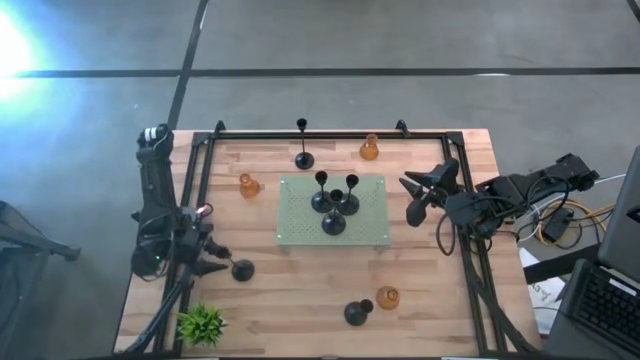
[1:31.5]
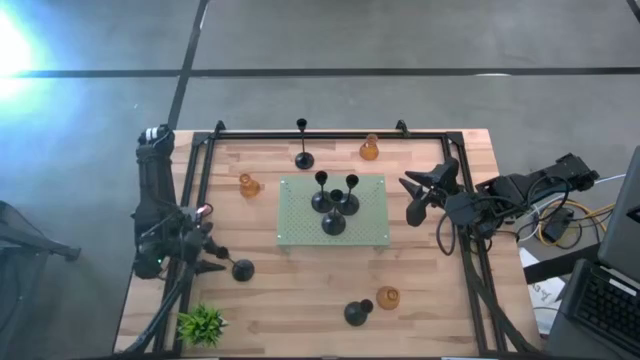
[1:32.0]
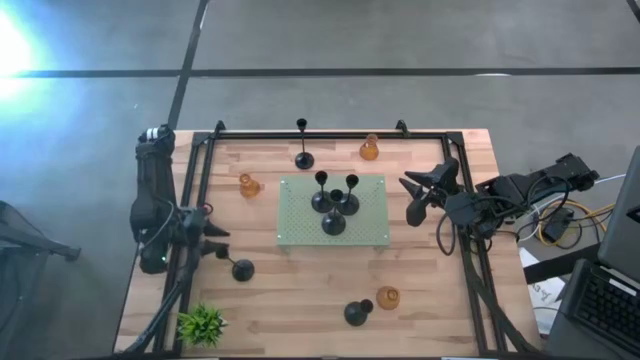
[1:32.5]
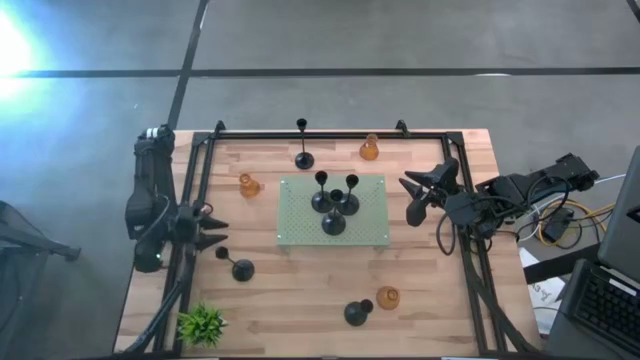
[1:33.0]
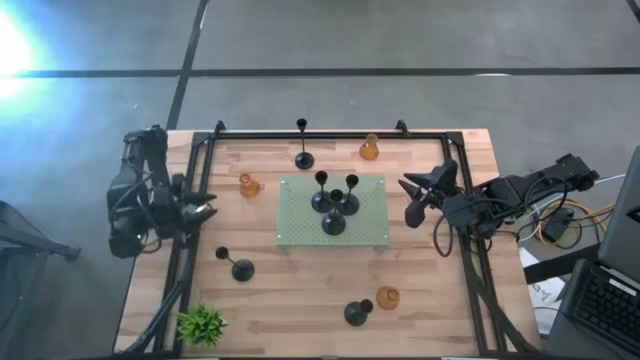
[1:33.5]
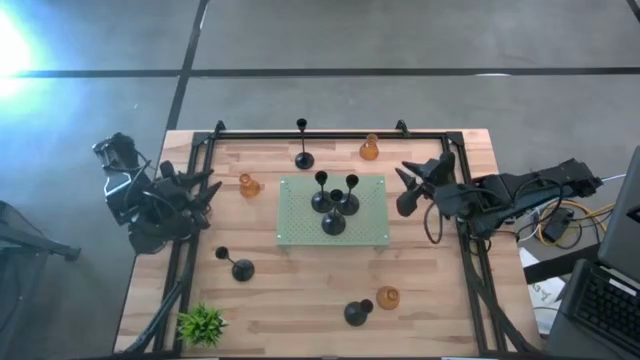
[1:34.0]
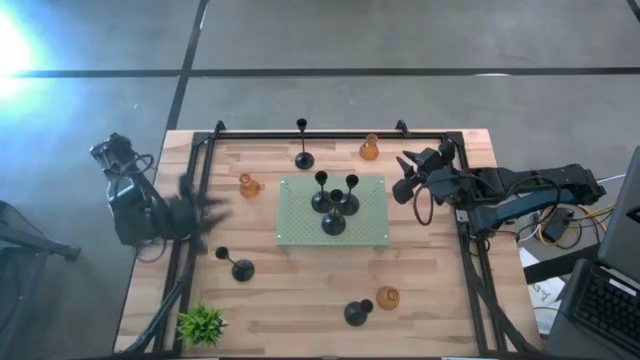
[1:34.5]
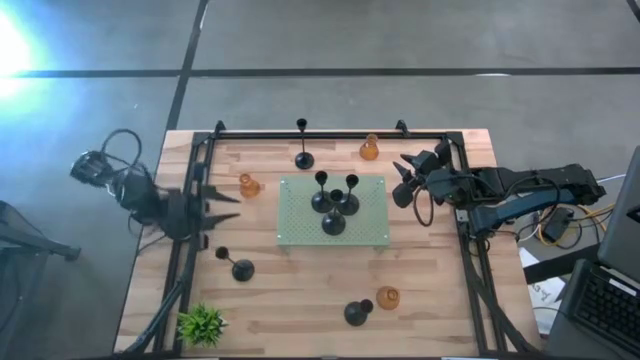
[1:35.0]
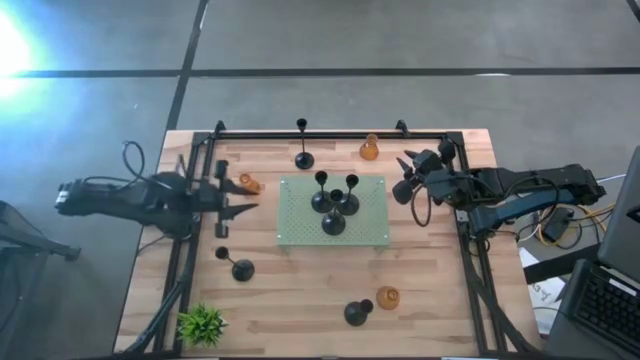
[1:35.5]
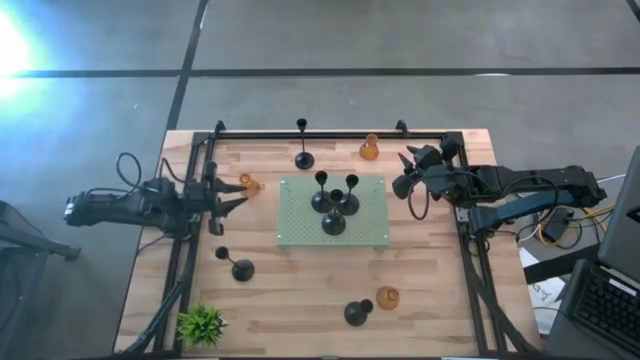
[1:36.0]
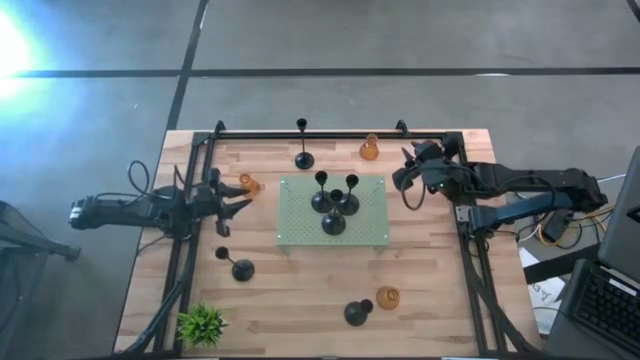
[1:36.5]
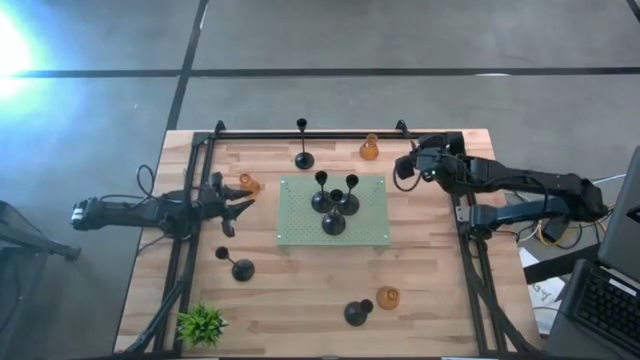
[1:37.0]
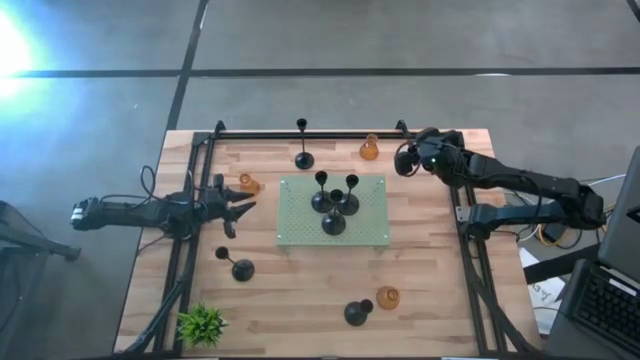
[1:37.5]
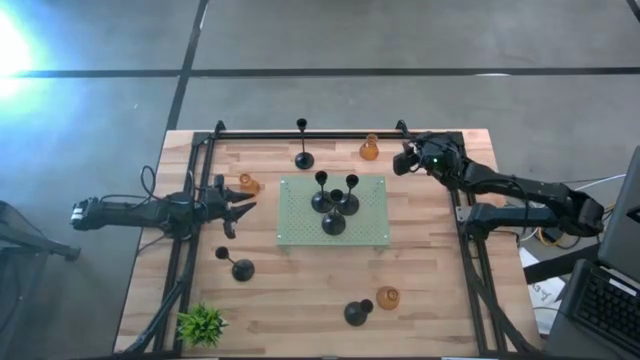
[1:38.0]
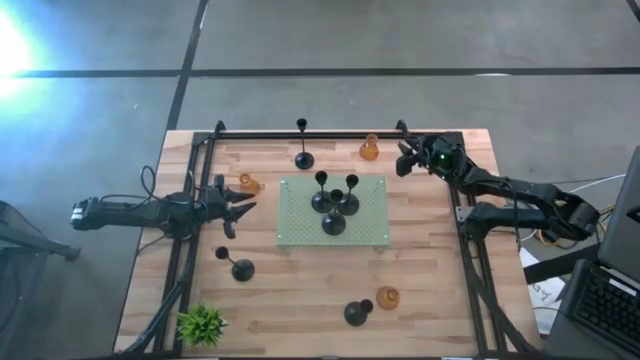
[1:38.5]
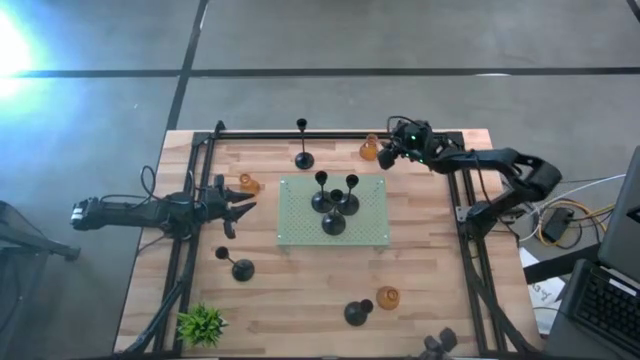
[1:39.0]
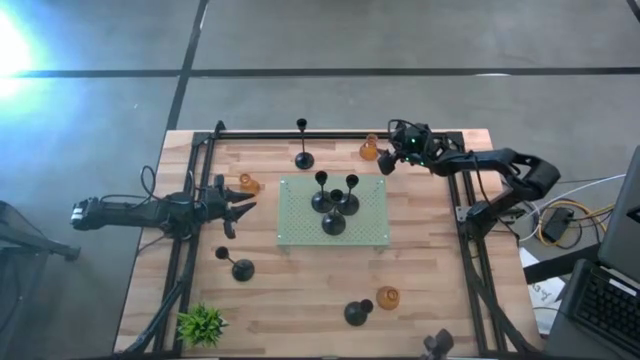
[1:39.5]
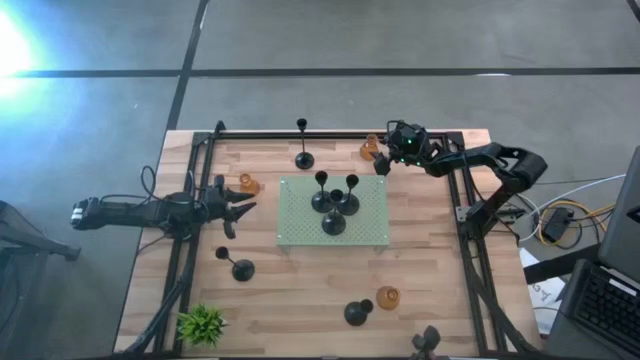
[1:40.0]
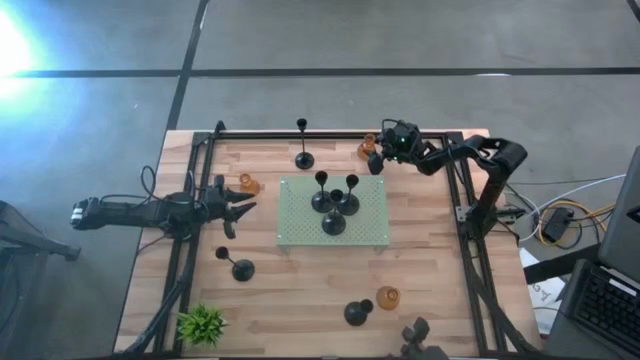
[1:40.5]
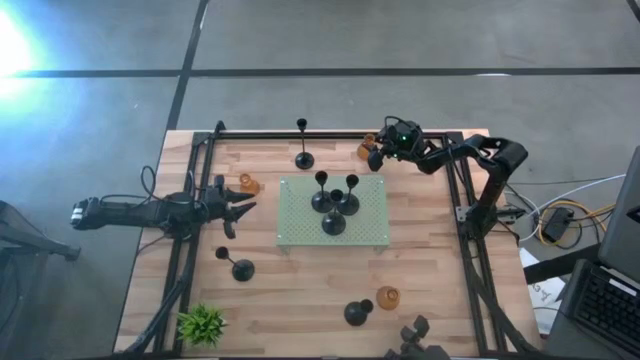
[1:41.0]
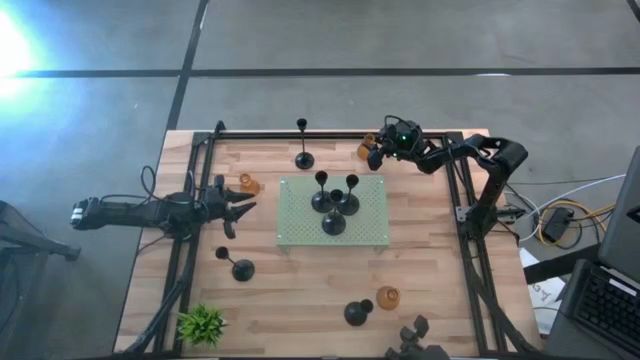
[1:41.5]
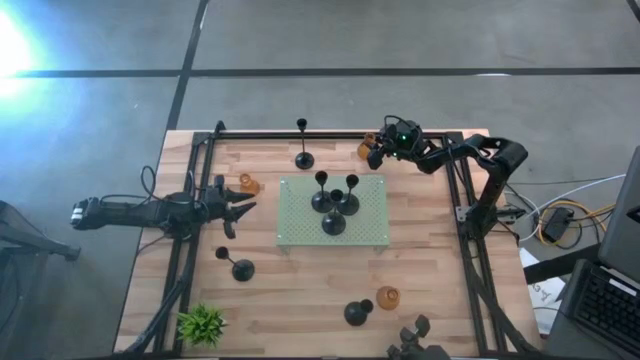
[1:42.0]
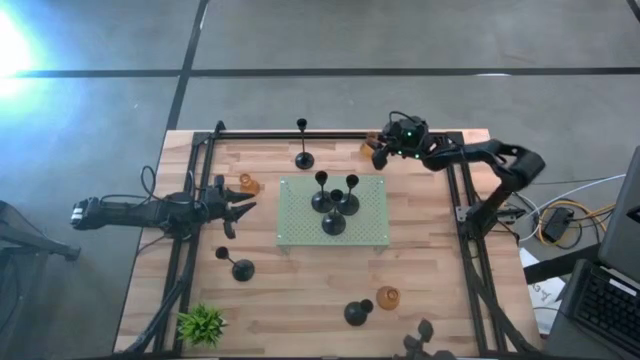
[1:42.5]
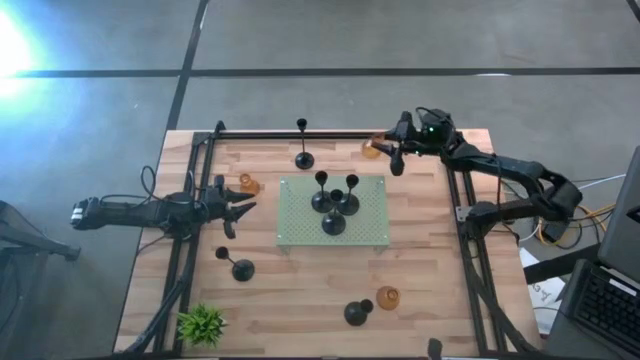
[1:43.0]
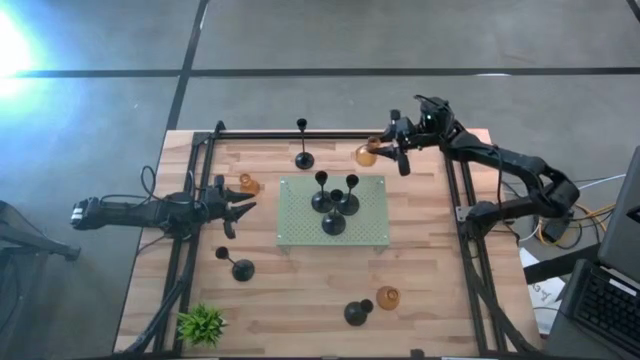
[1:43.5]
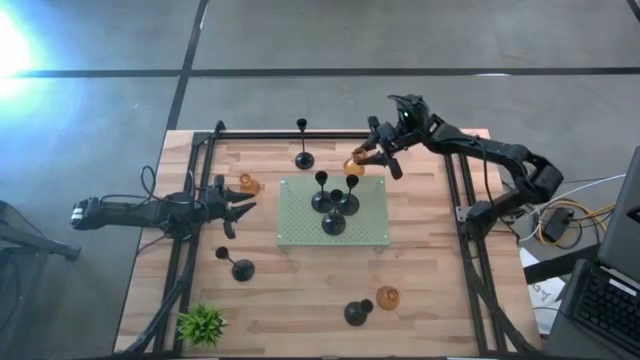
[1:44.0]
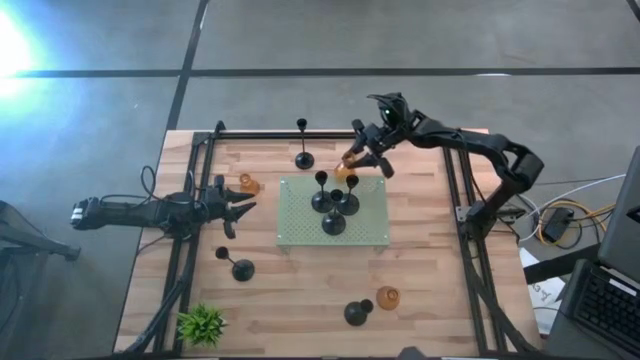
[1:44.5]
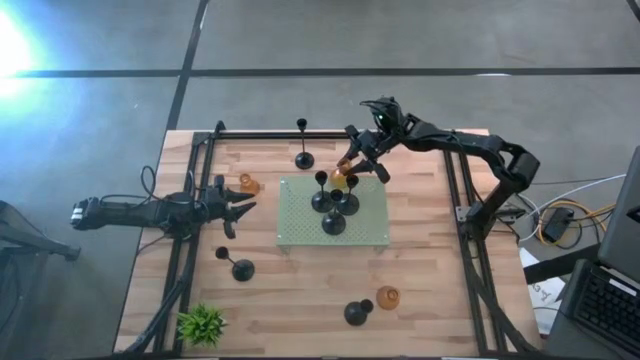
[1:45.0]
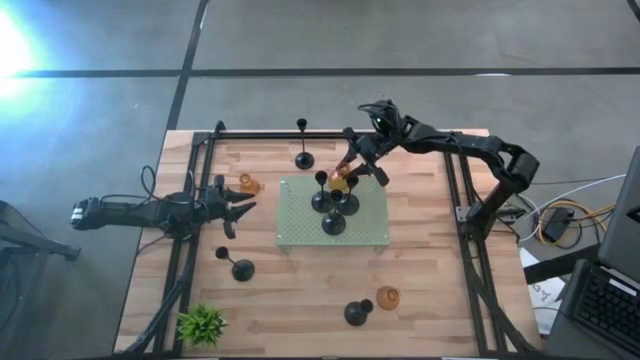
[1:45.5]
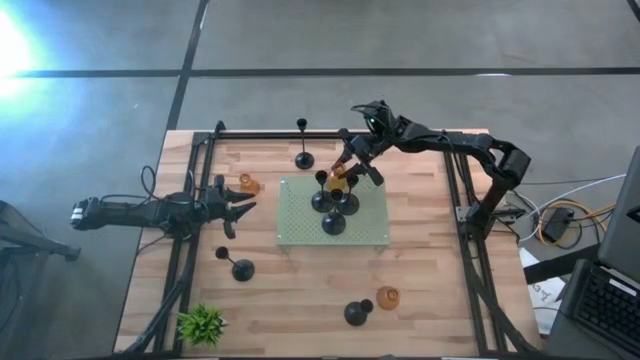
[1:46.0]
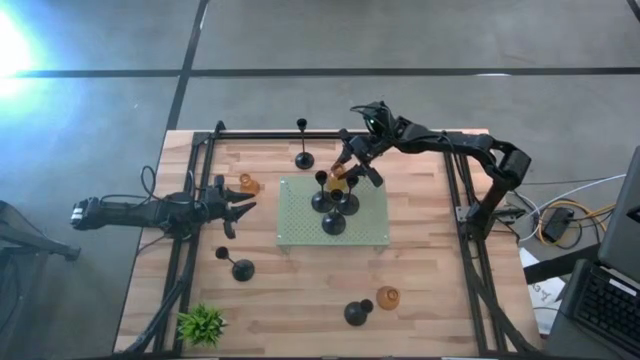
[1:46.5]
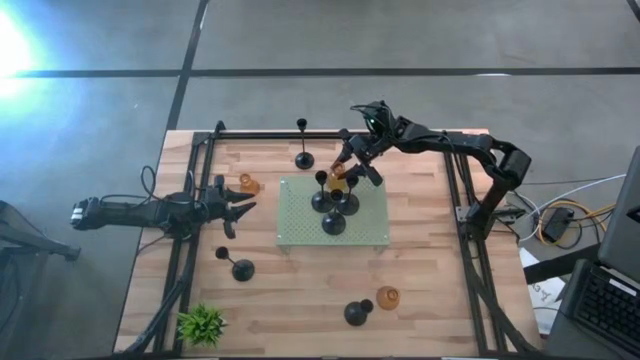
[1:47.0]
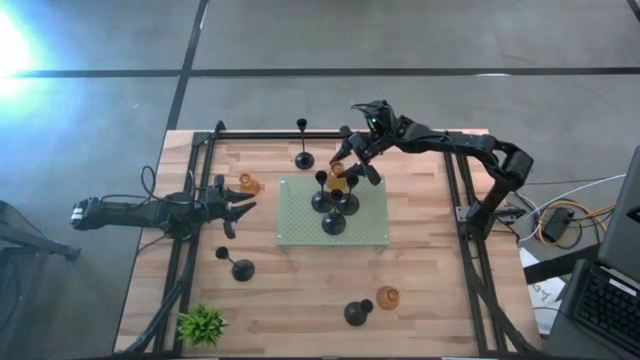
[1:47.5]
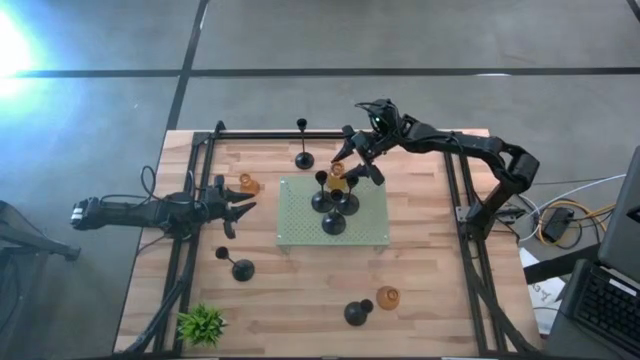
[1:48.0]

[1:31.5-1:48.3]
Task: Pick & Place candle stick holders
Put the yellow glass on the shelf

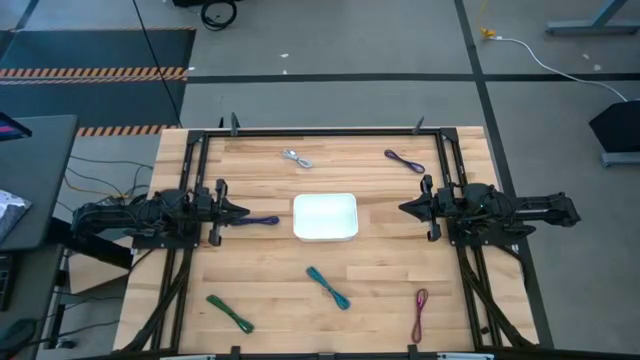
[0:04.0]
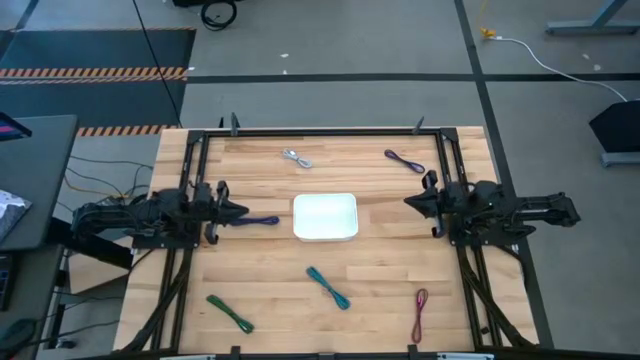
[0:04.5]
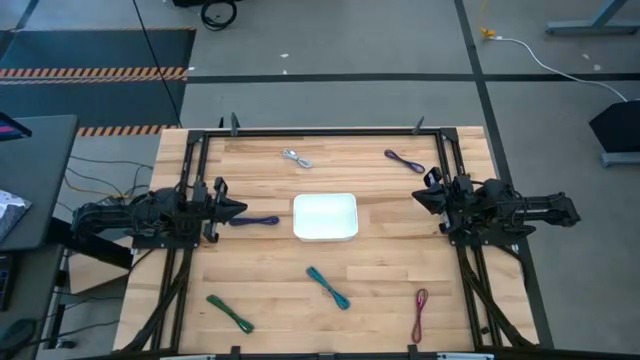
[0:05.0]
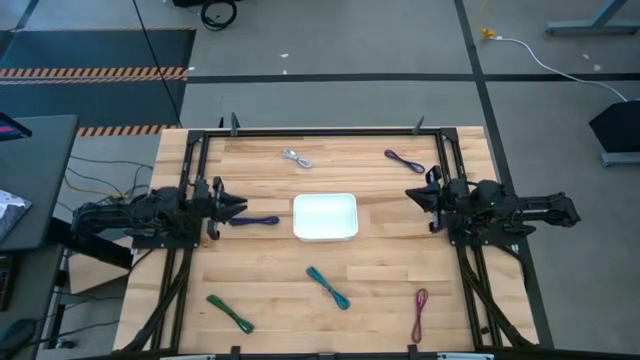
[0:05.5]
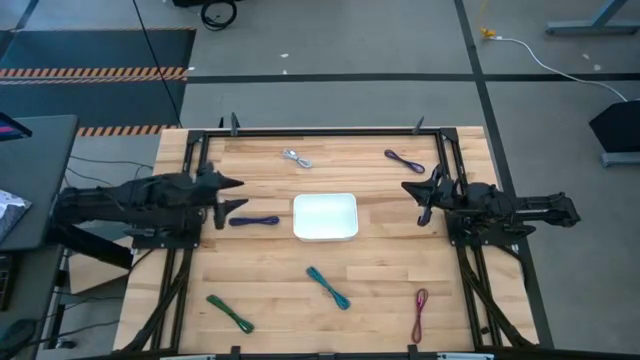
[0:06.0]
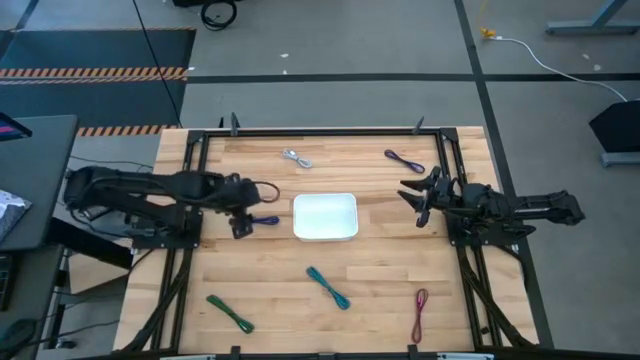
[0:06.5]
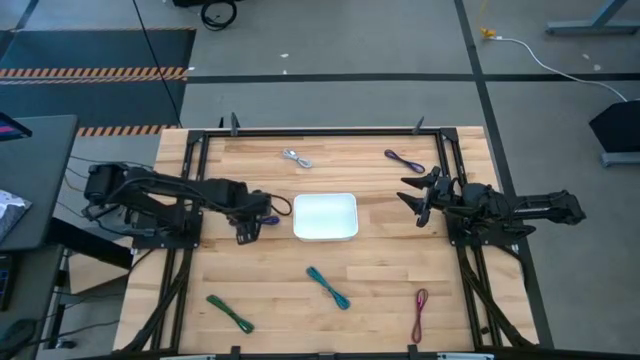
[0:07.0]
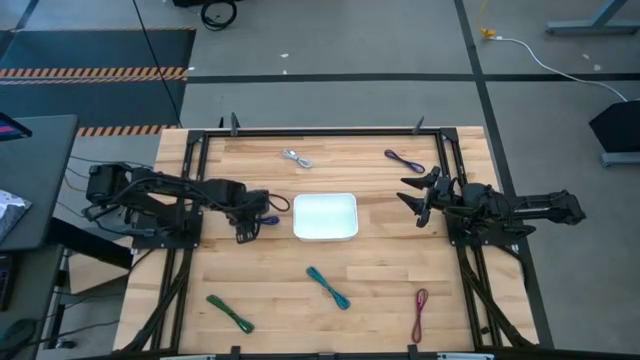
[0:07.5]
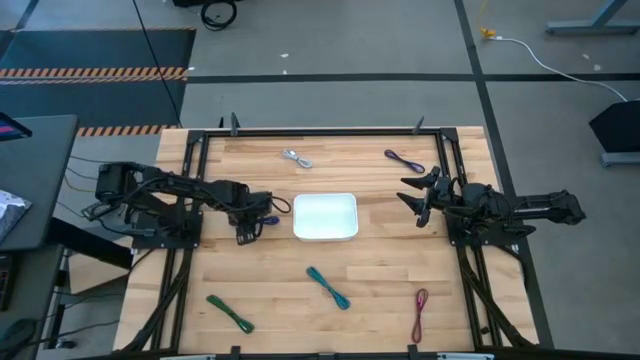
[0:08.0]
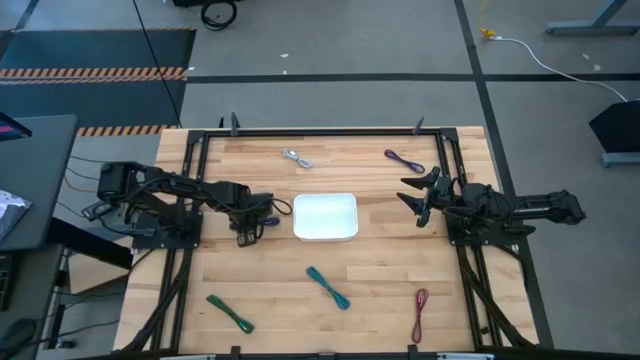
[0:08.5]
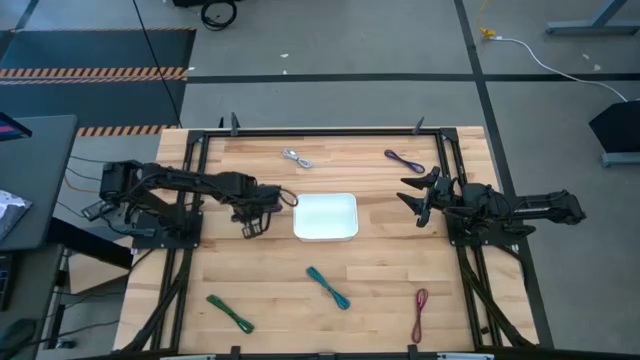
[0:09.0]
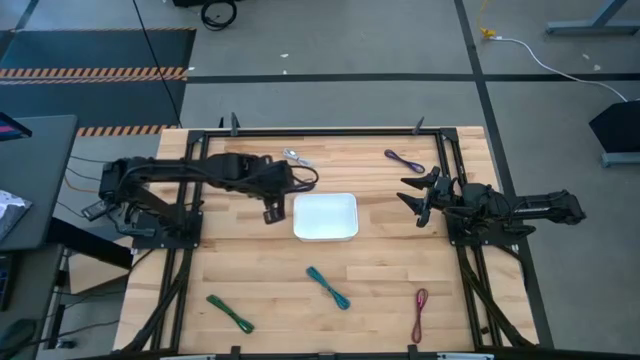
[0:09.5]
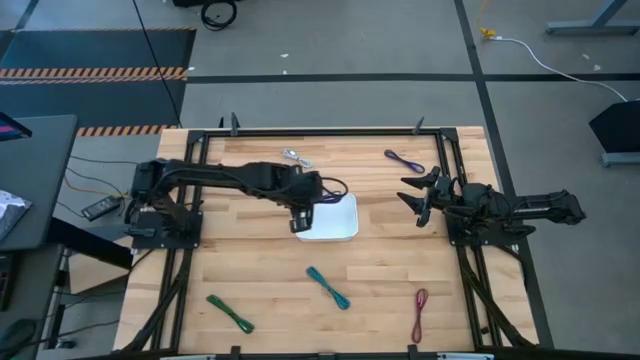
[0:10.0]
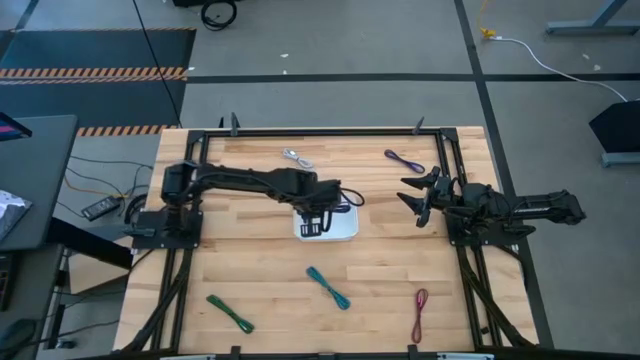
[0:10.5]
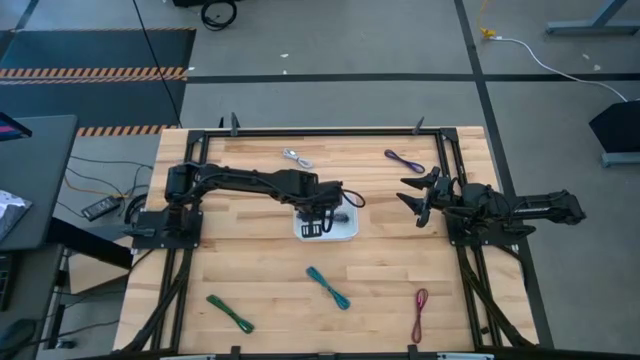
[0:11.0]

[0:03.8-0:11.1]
Task: Pick and place USB-C Cables
Put the dark blue charger cable into the white bin
